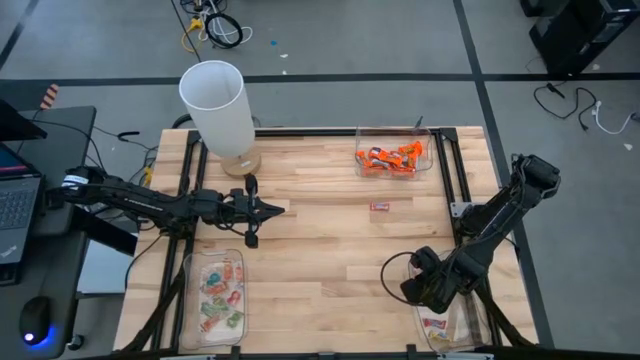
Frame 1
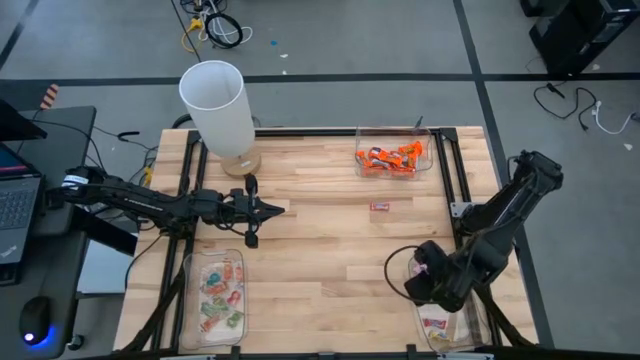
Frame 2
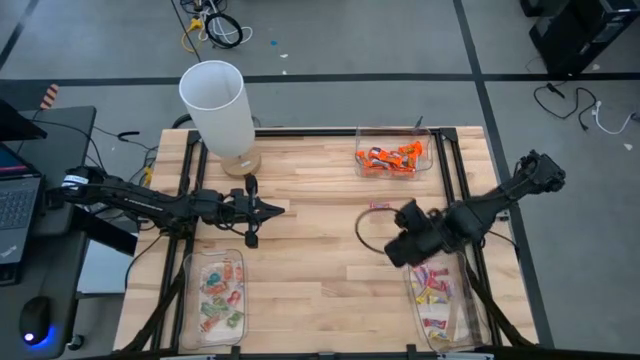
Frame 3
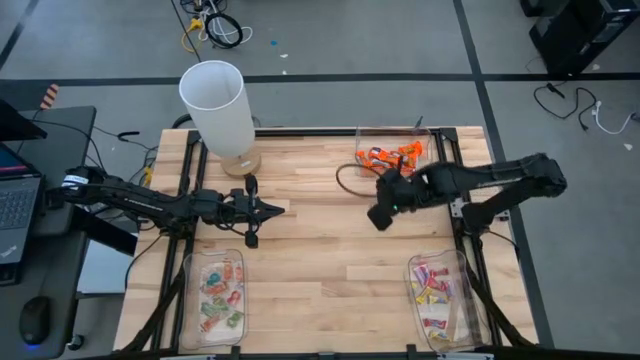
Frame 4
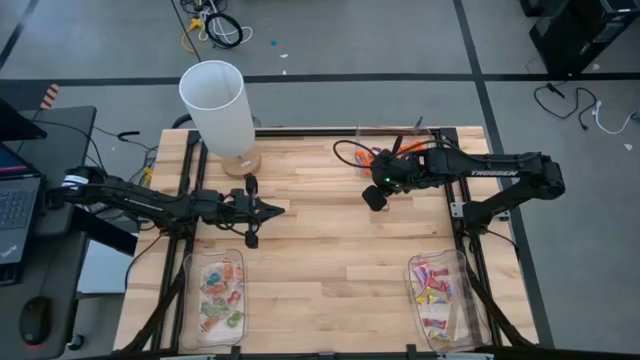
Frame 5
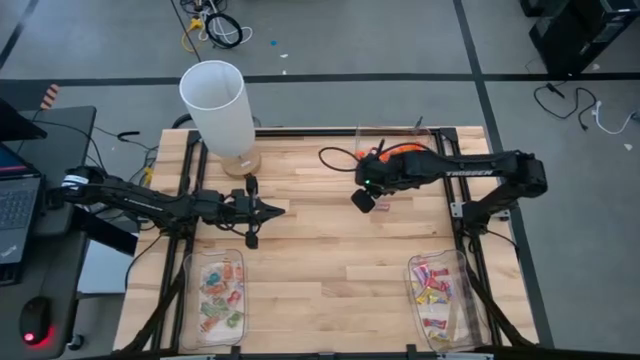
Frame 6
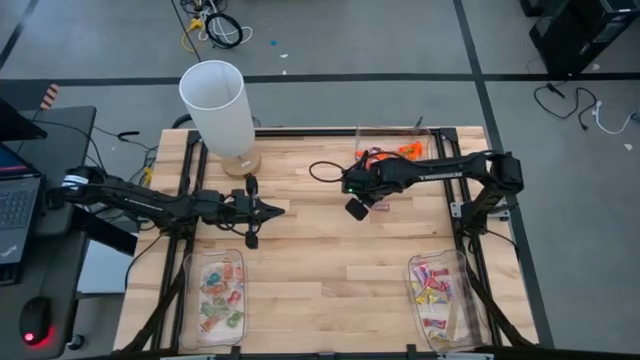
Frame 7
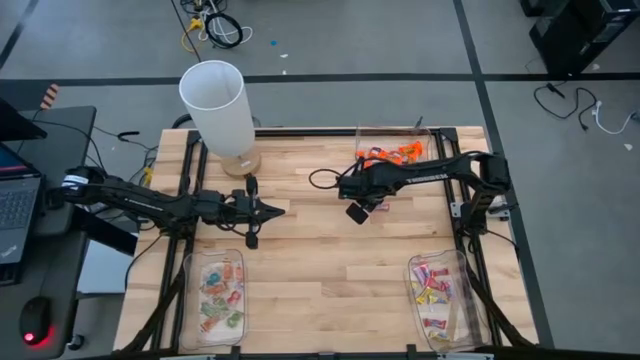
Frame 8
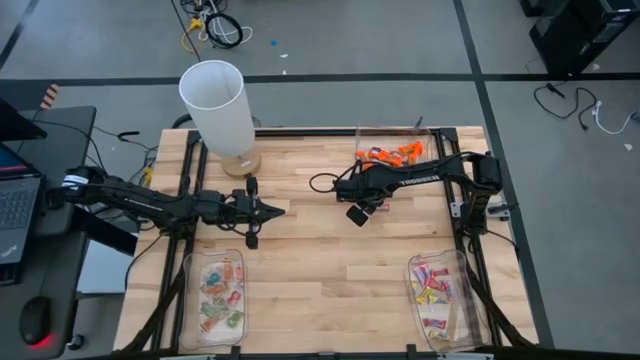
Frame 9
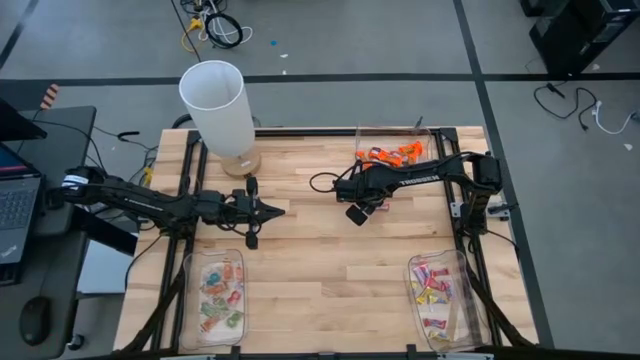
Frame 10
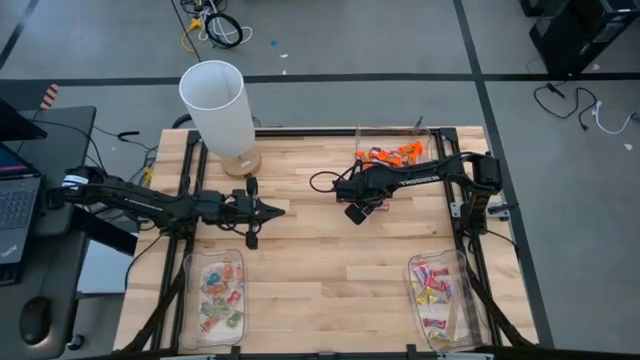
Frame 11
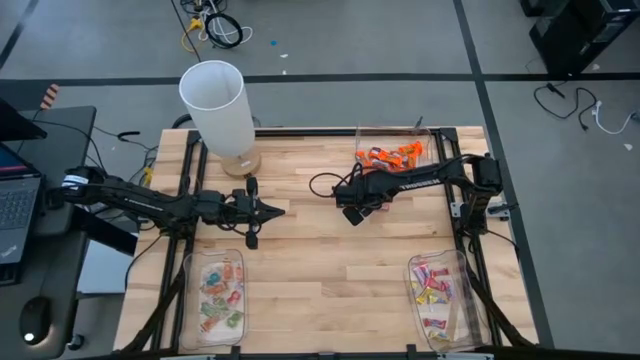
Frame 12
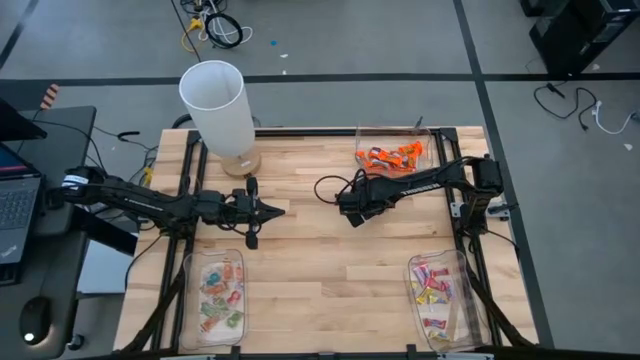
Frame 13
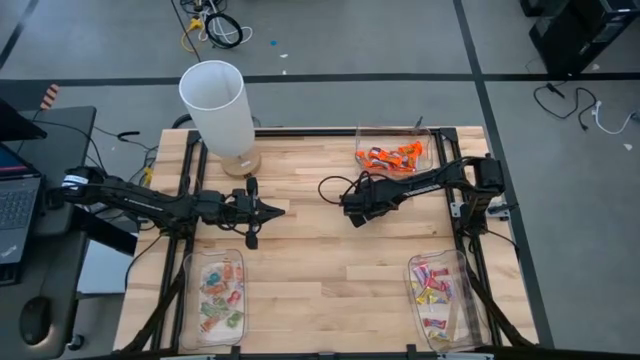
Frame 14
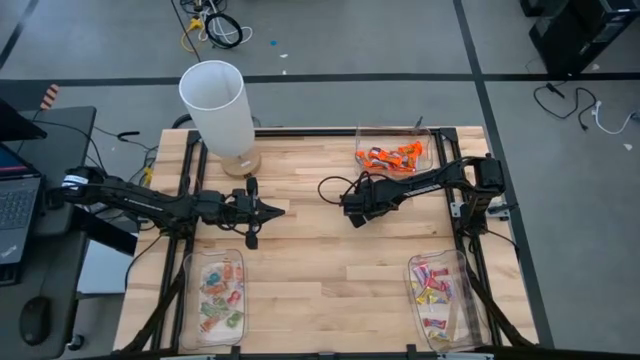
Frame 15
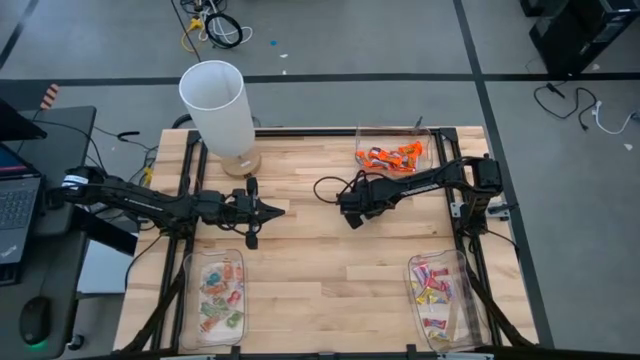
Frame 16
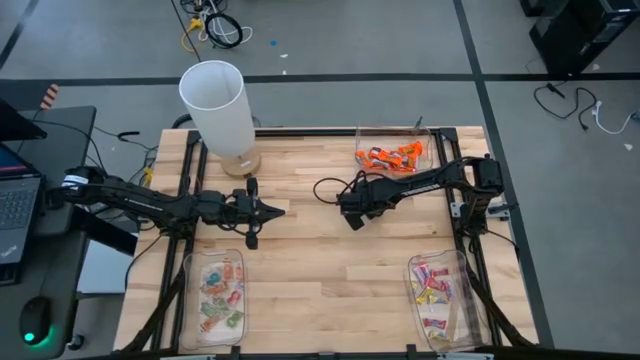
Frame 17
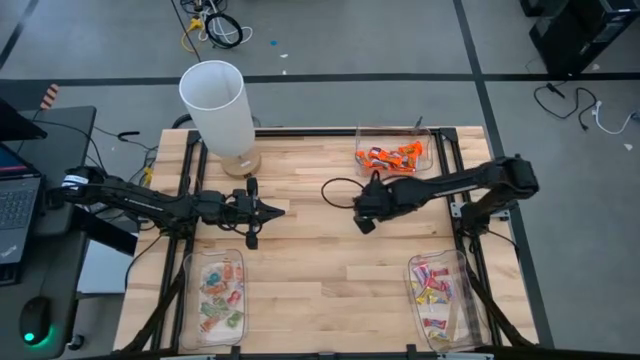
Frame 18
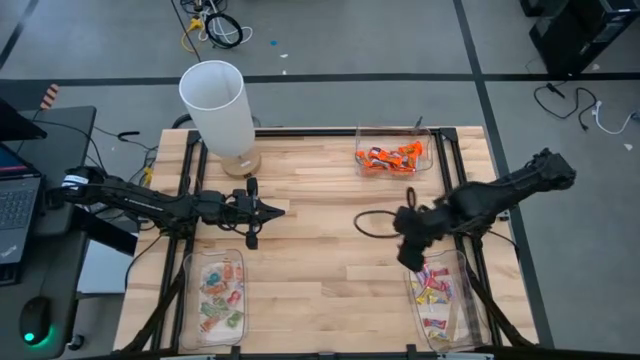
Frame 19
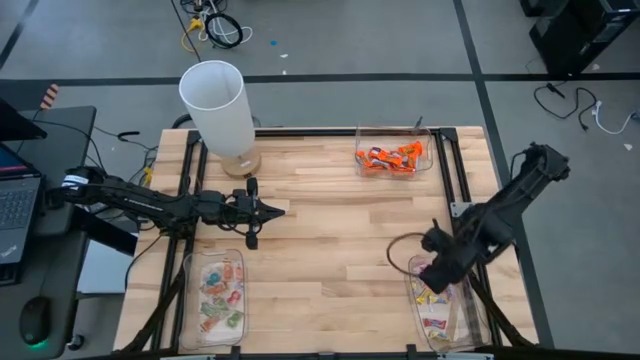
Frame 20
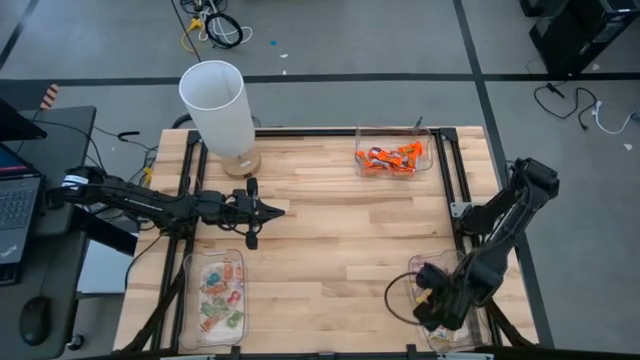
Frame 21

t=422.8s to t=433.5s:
Task: Sort candy
Put the red candy into the bottom right transparent bin

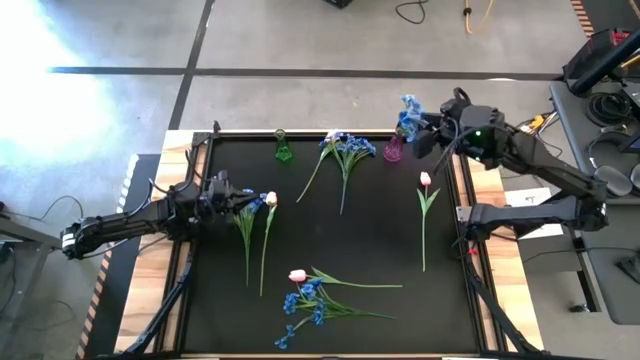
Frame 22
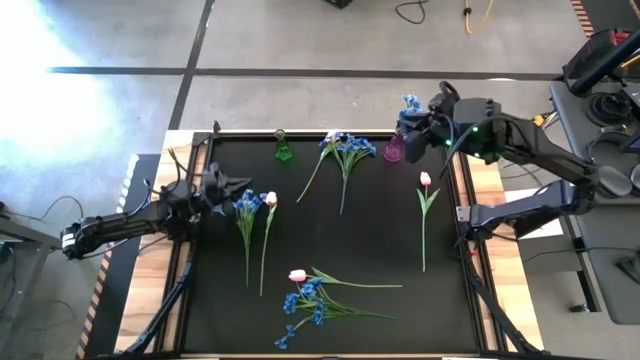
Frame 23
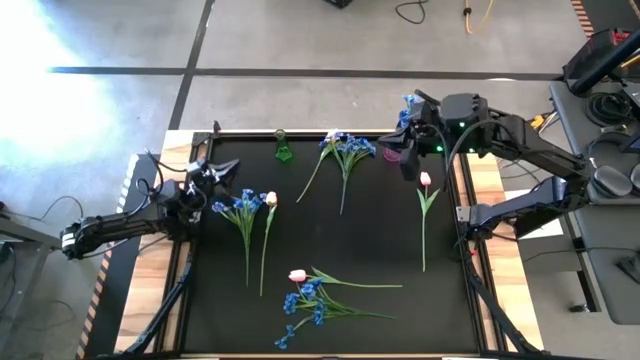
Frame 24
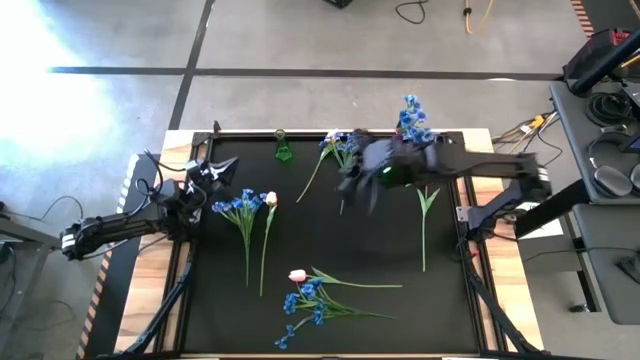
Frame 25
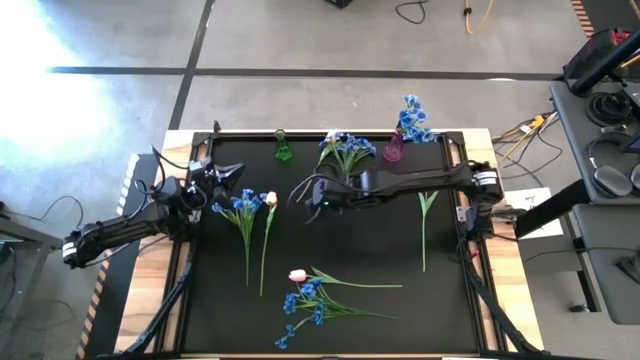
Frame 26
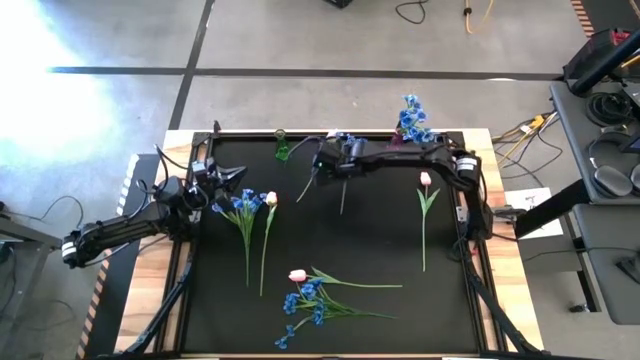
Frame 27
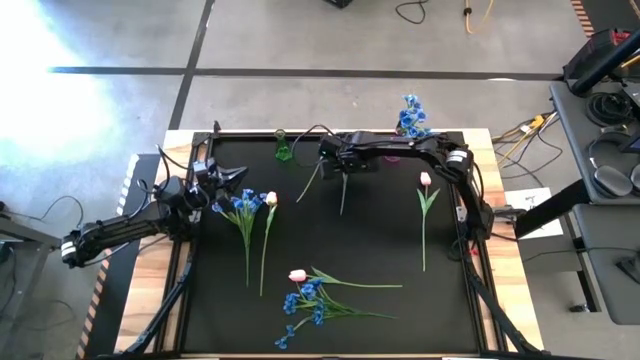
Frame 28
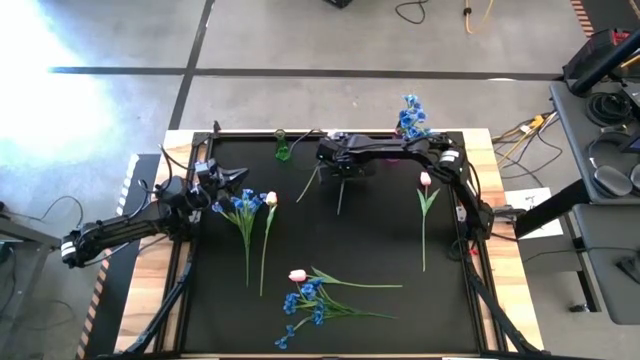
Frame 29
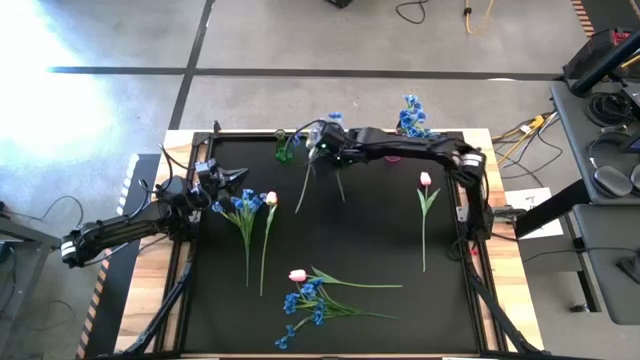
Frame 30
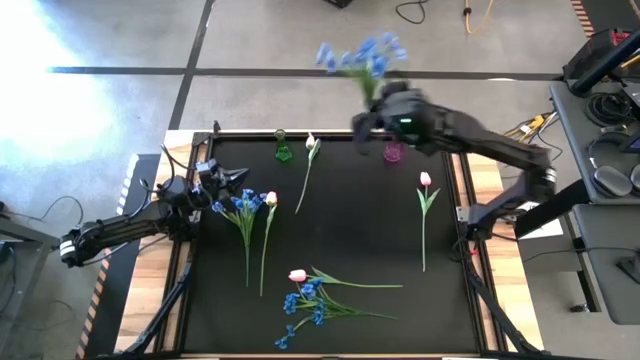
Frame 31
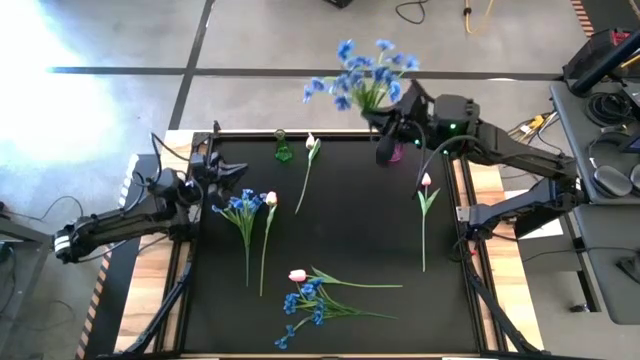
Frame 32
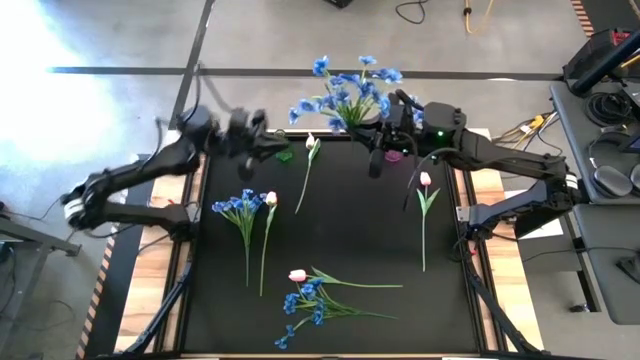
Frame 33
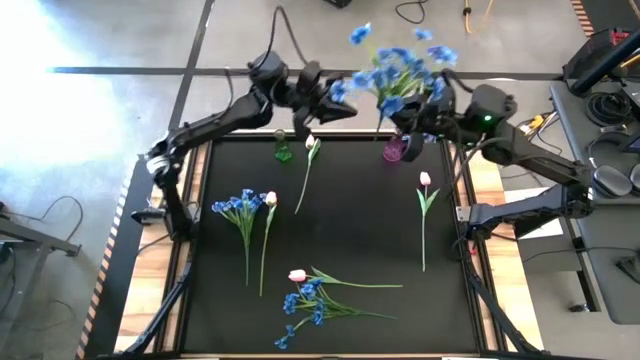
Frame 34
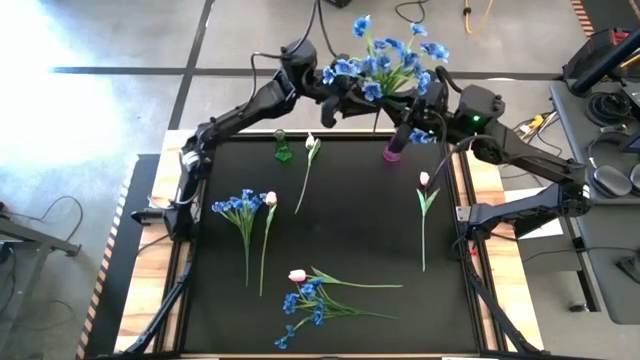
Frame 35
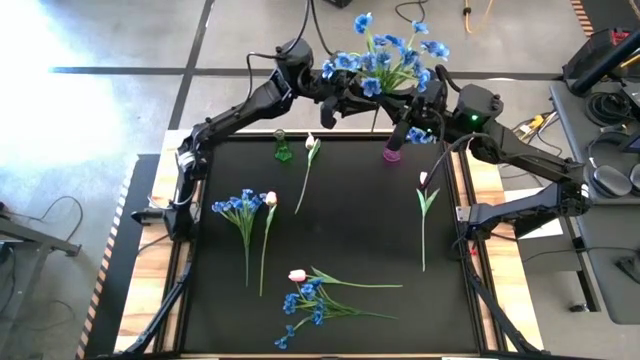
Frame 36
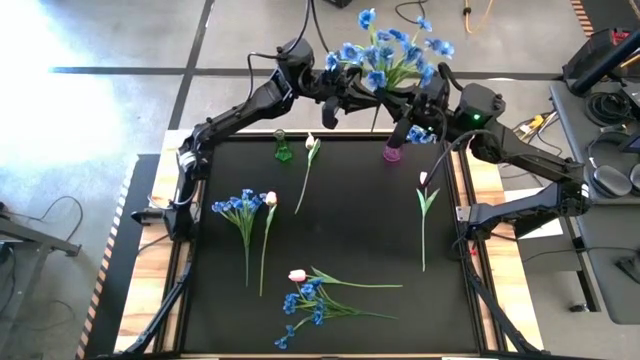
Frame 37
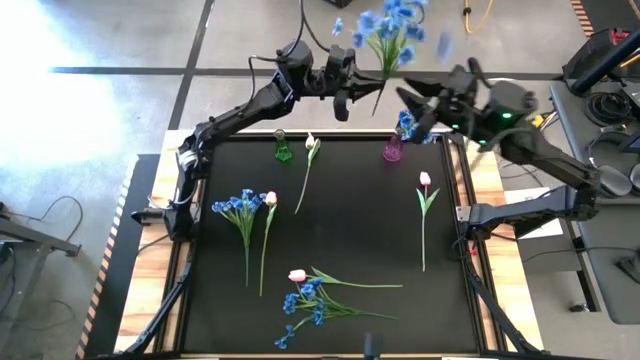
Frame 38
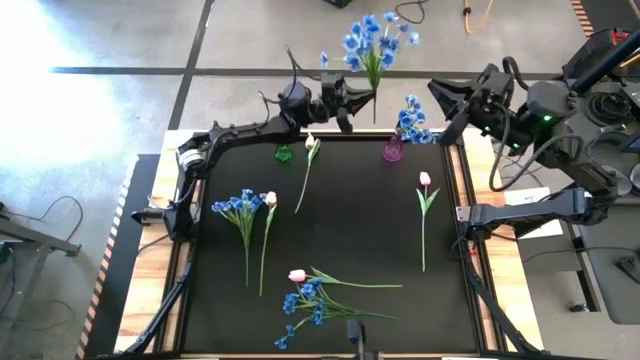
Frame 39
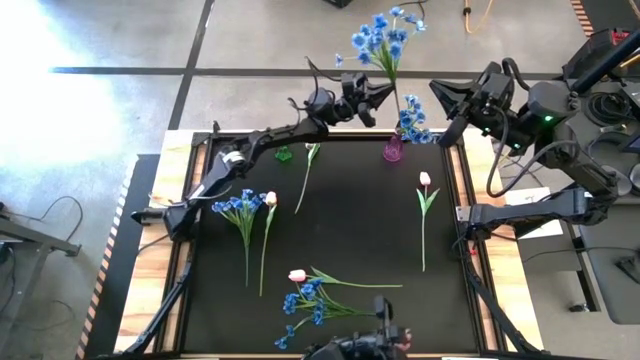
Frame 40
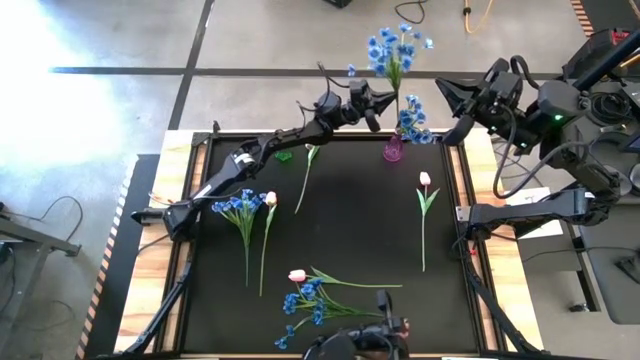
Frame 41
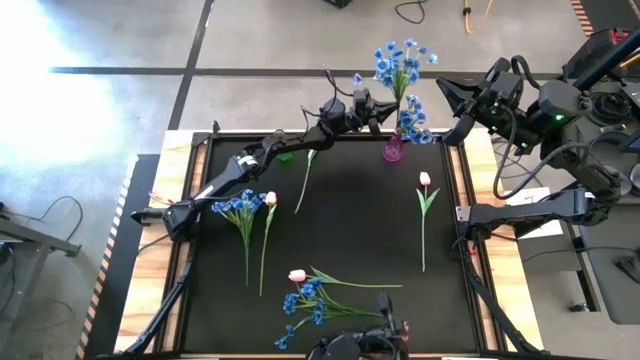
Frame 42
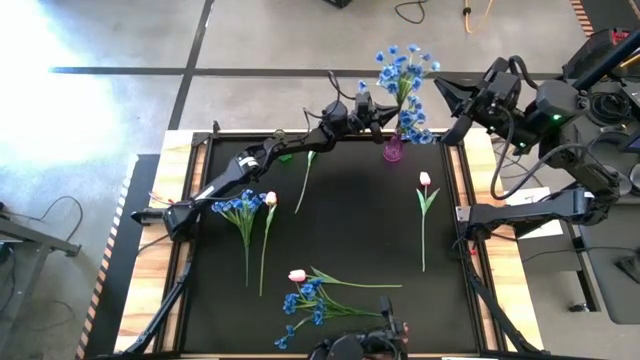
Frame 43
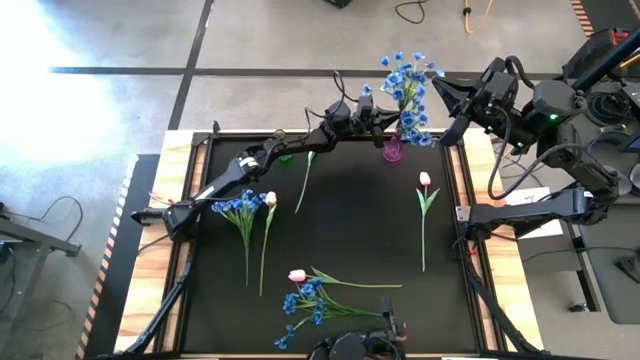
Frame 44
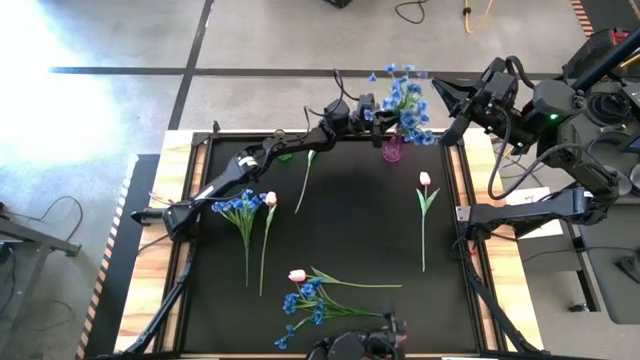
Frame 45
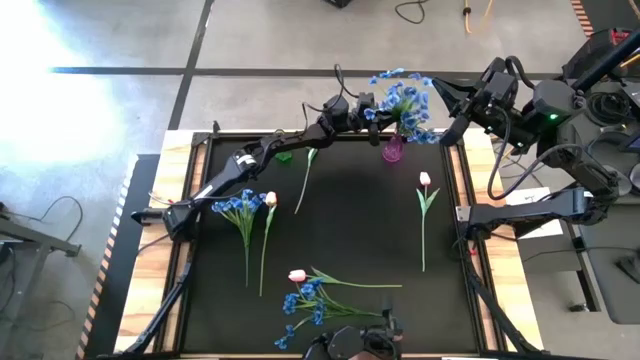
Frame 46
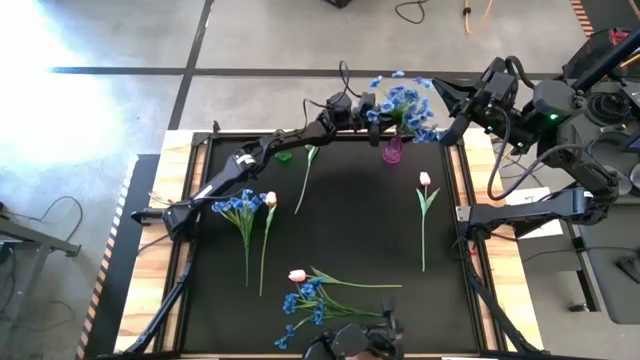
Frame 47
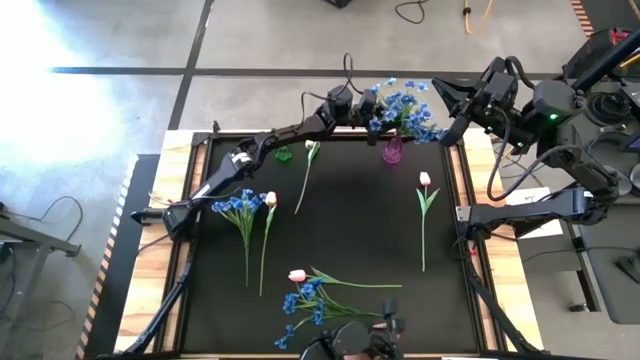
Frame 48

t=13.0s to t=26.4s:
Task: Sort flowers into vase by color
Put the blue flowers into the violet vase
